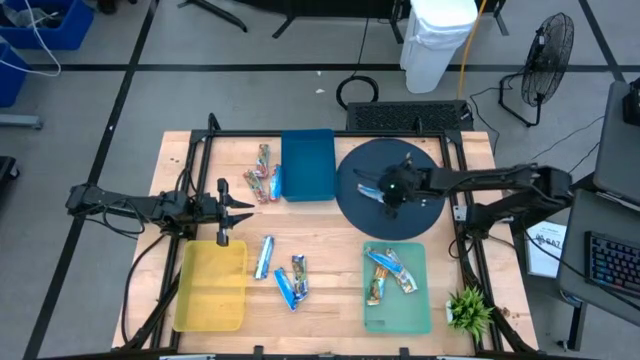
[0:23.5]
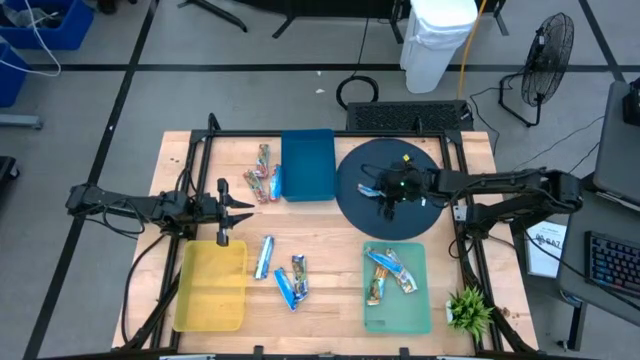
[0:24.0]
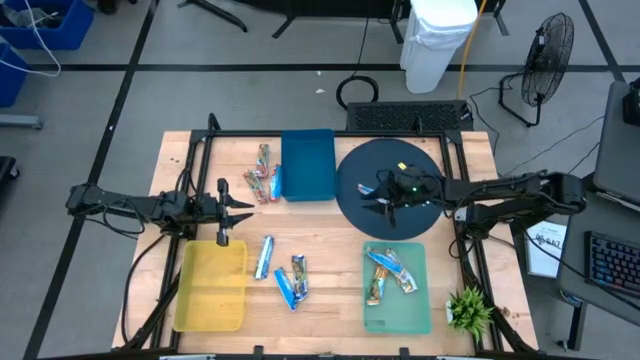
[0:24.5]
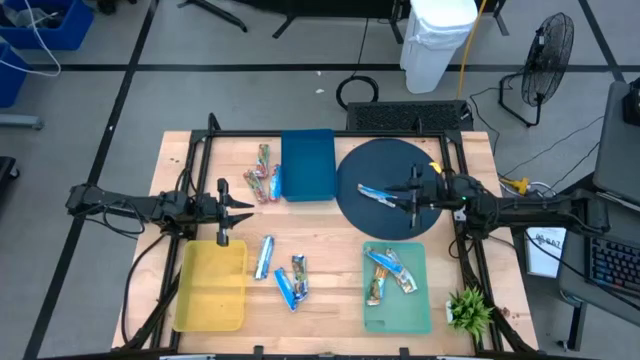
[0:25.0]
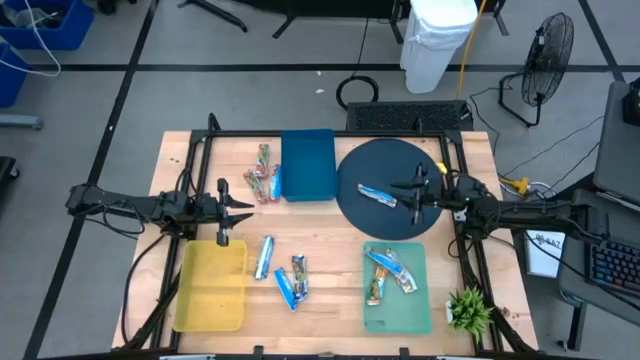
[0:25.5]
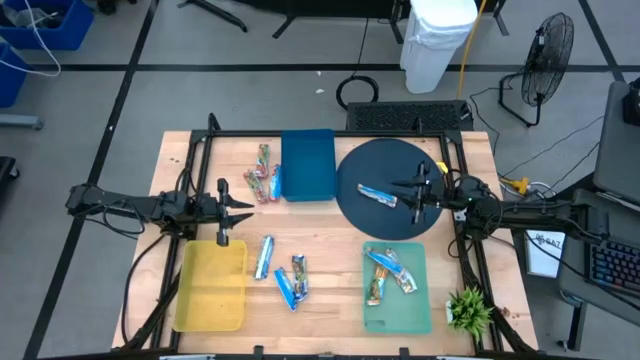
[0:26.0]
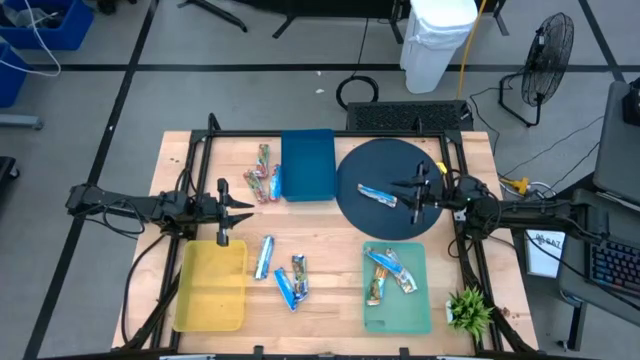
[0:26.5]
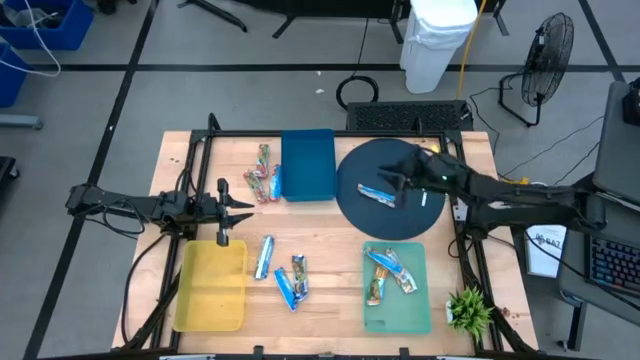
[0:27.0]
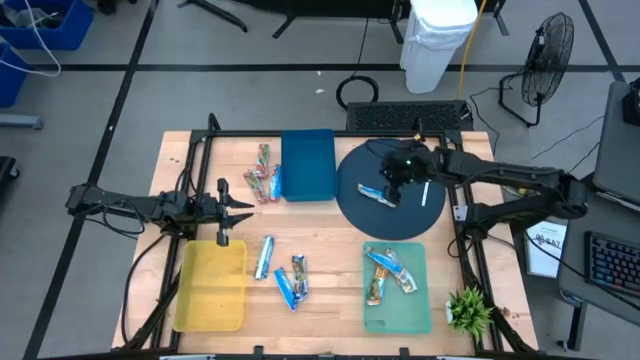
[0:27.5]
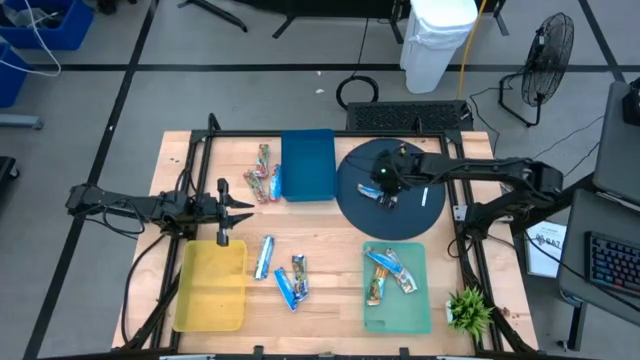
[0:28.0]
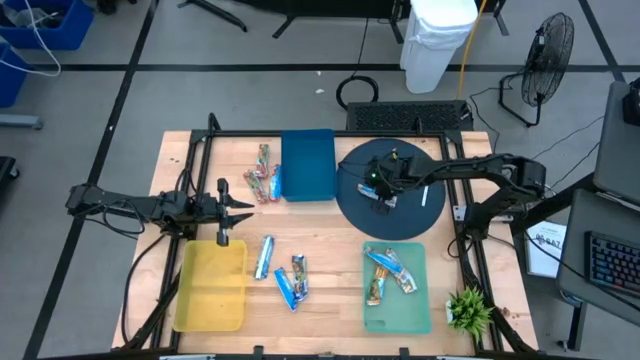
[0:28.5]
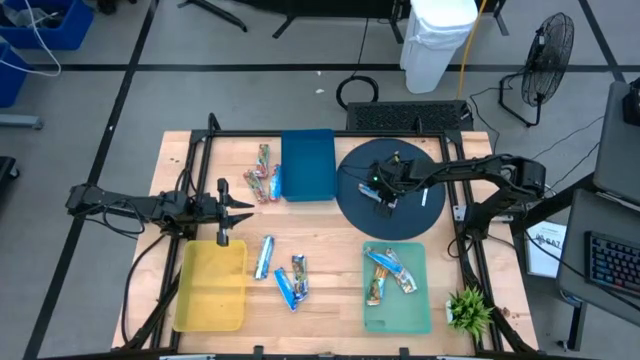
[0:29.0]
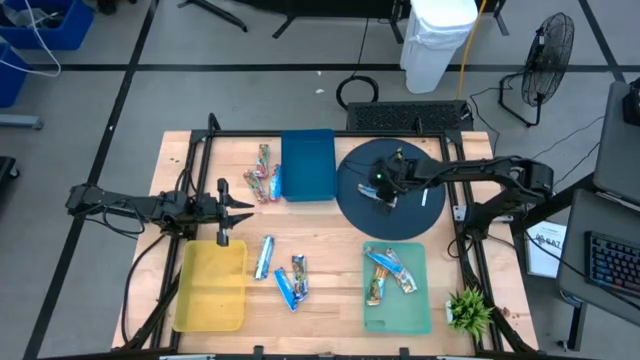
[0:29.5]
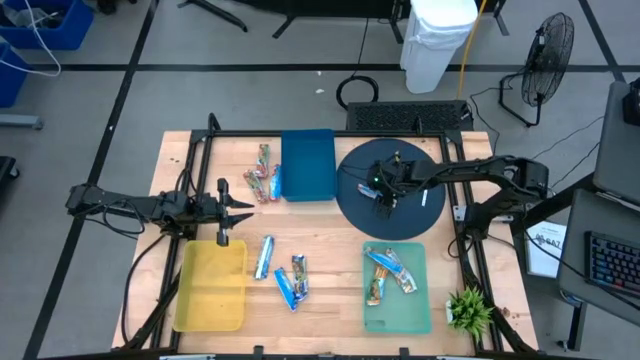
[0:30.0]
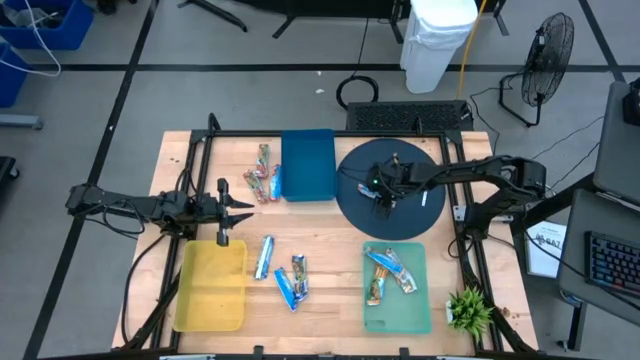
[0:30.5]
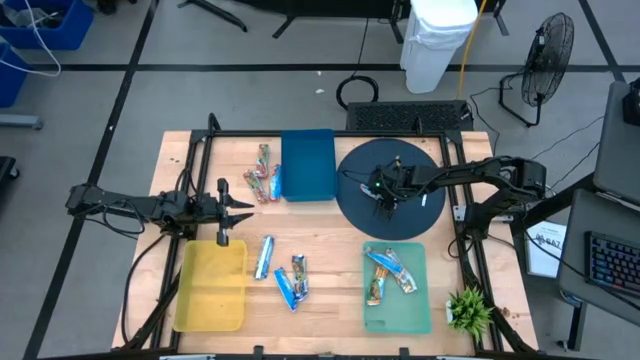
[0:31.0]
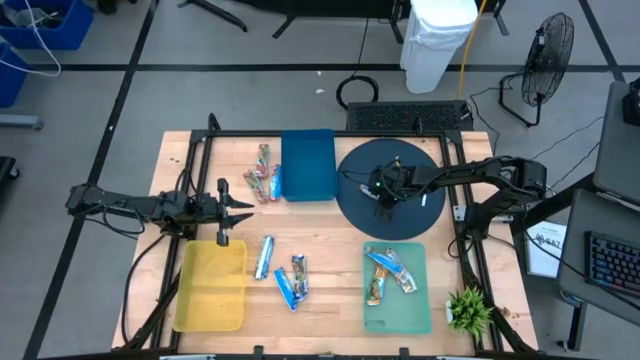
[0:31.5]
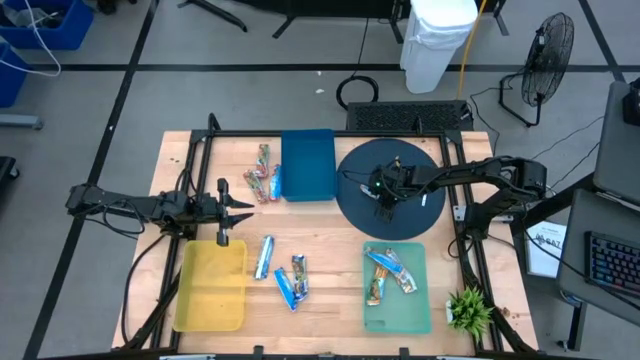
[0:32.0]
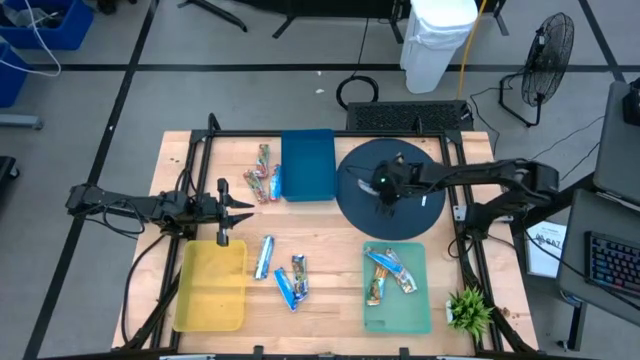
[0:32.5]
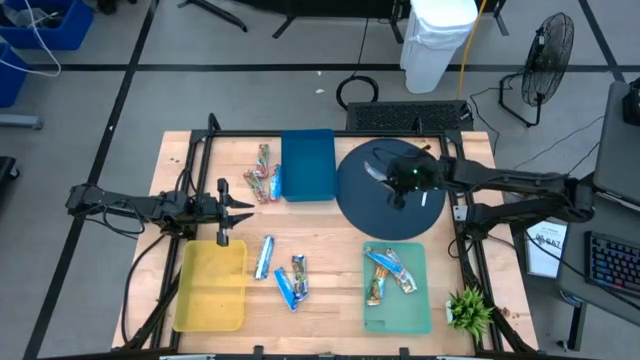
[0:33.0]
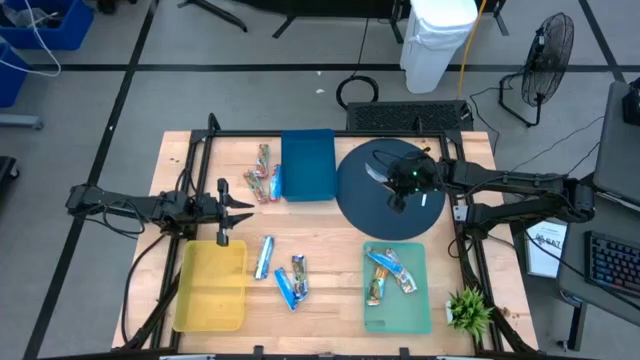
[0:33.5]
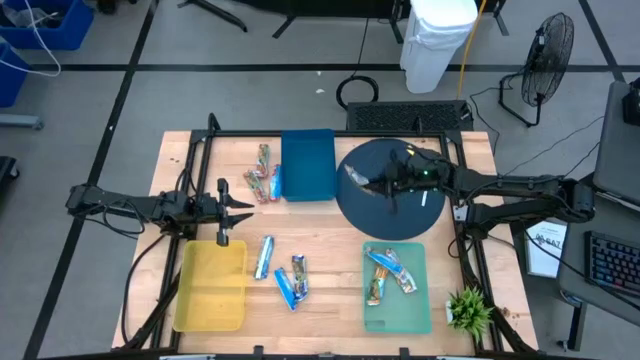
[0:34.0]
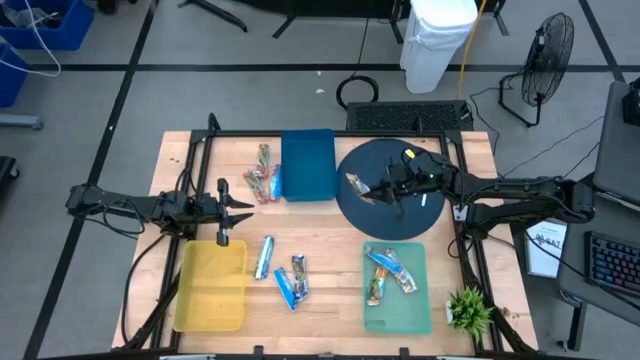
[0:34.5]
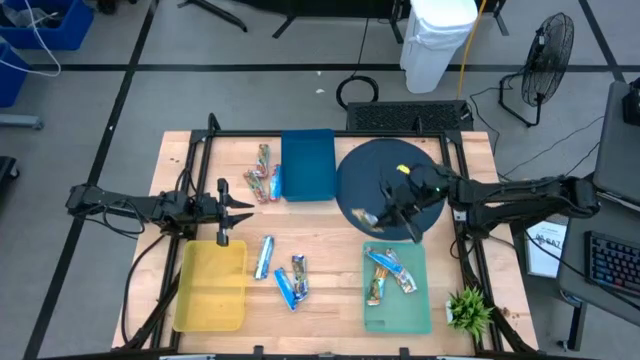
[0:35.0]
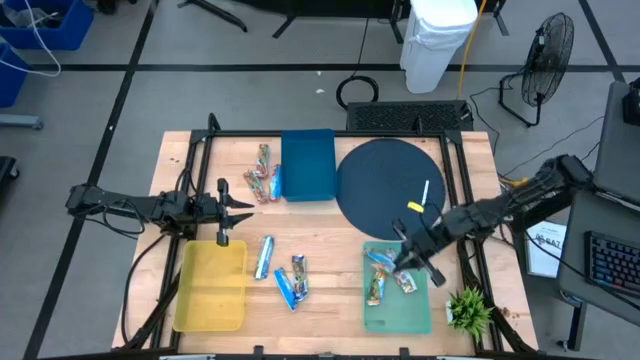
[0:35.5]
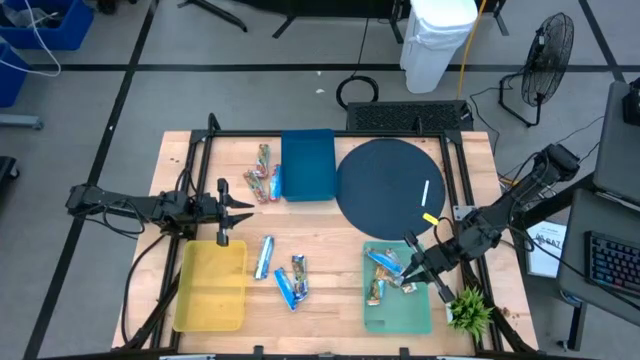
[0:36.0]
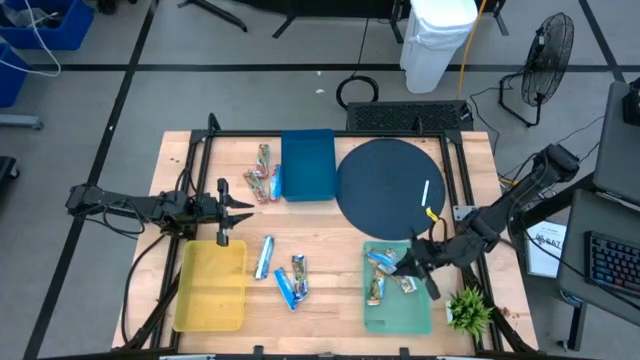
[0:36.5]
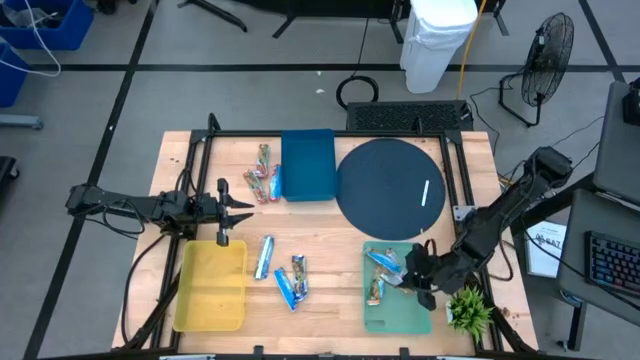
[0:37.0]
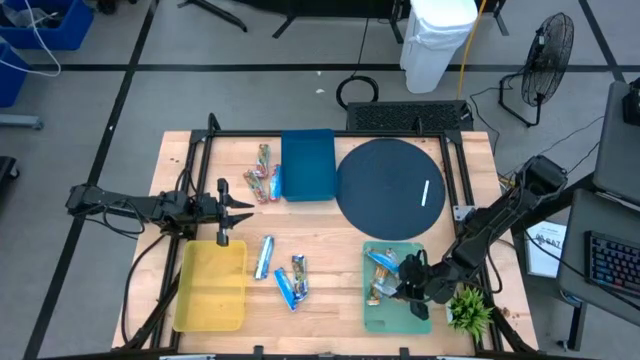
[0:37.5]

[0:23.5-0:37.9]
Task: Pick and place Granola Bars by type
Put the yellow granola bar into the green bin

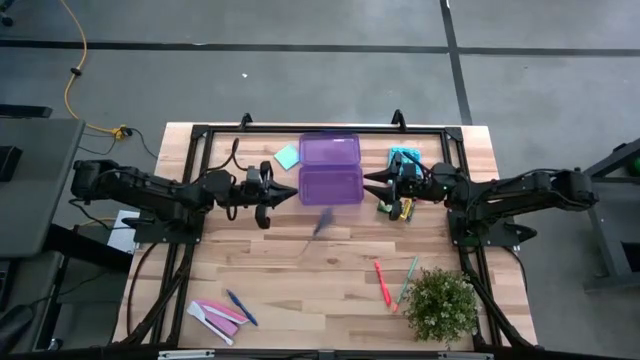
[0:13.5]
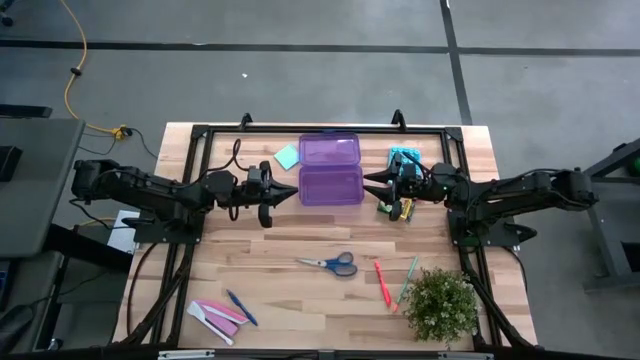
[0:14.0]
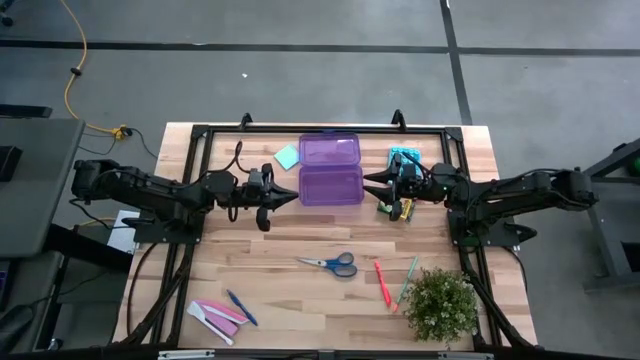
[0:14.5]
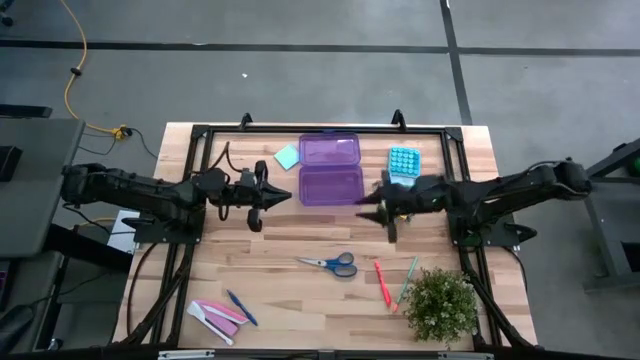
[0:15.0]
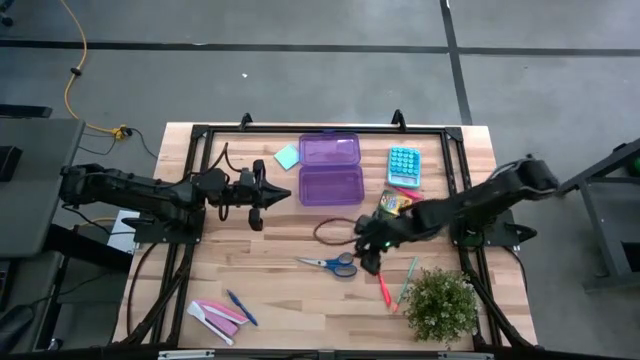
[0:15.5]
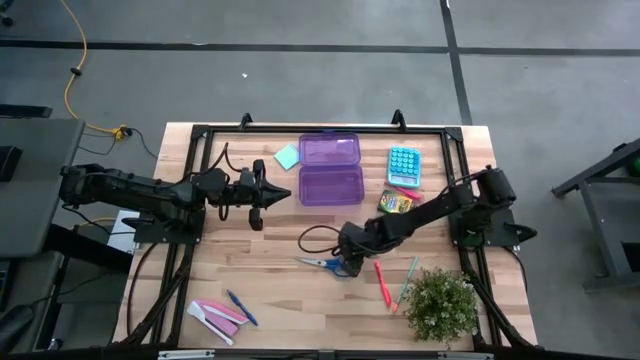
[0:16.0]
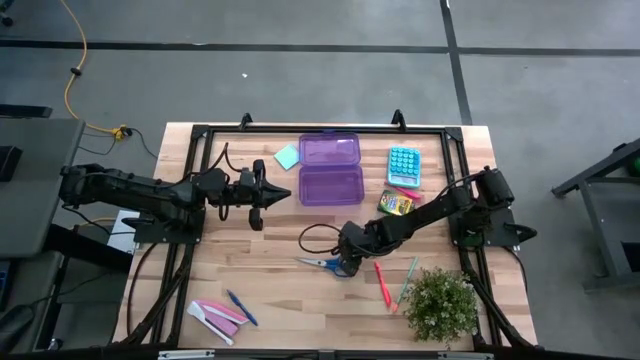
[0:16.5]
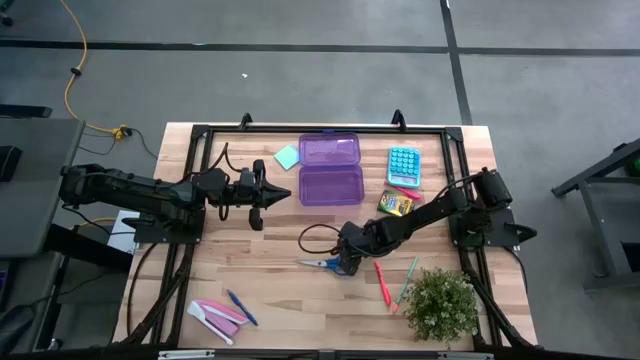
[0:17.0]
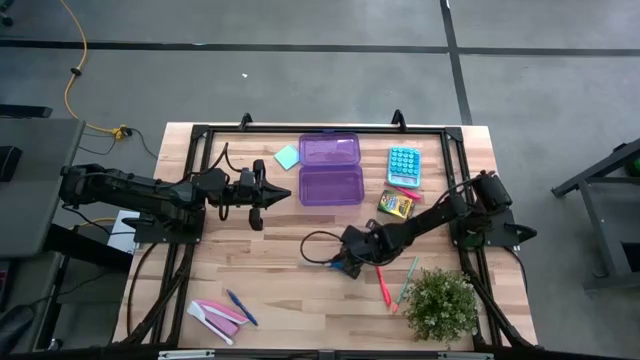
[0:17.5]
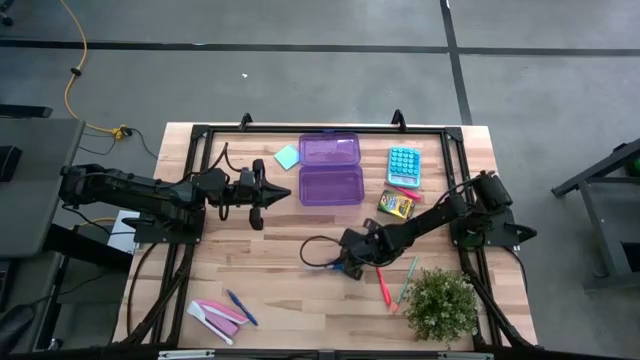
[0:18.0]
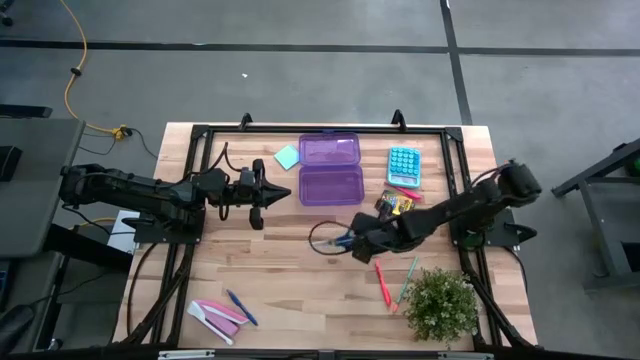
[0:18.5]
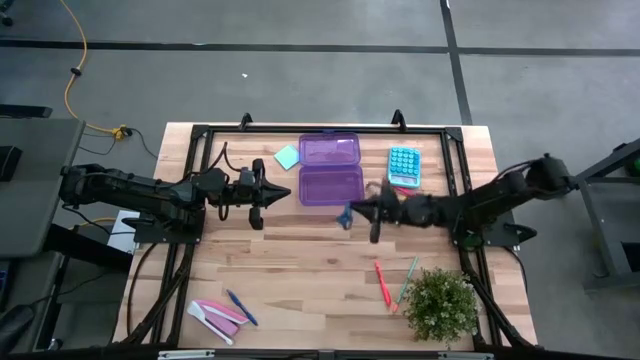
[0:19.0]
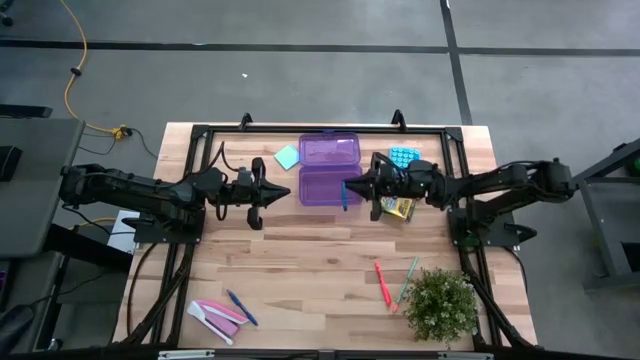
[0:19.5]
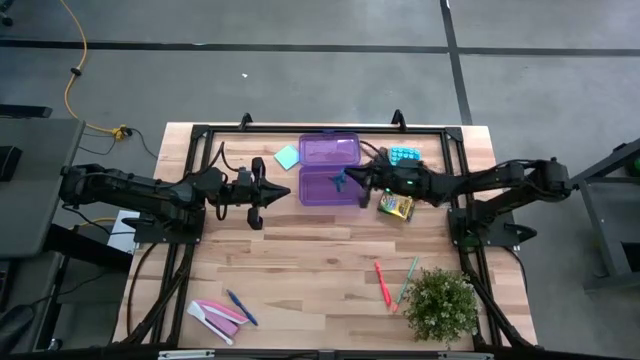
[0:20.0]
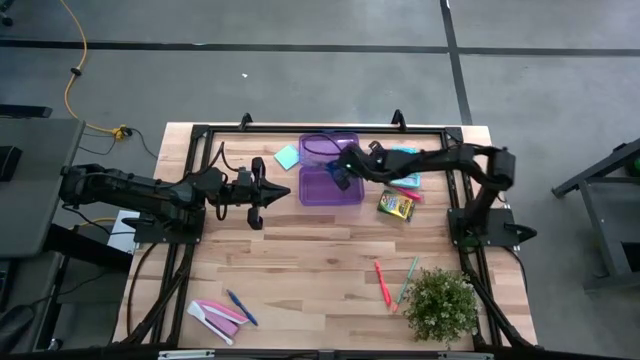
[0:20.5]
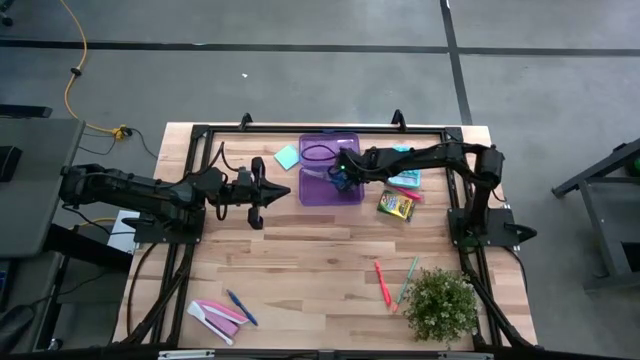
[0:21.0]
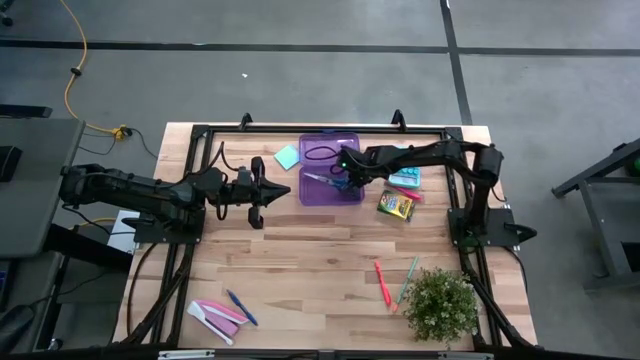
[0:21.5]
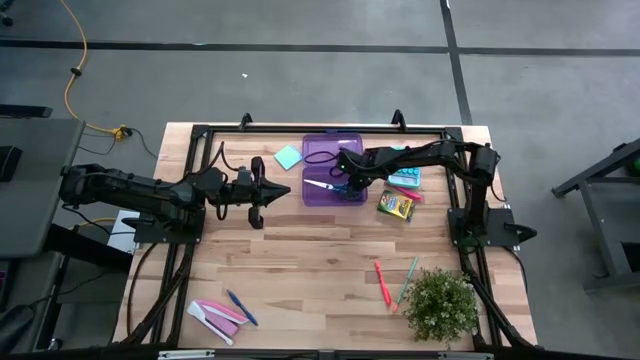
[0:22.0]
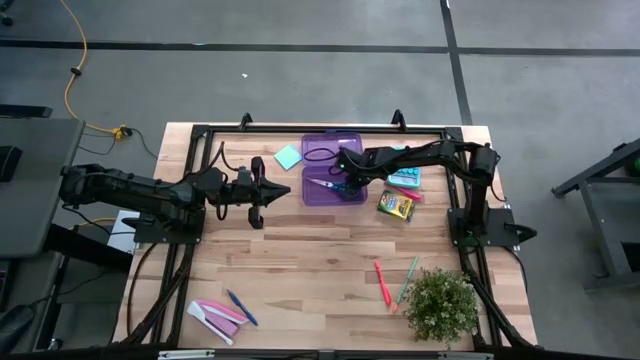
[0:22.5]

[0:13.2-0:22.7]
Task: Pack school essentials
Put the blue scissors into the violet supply box
